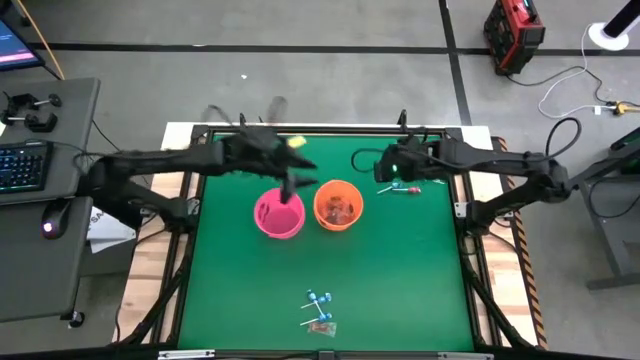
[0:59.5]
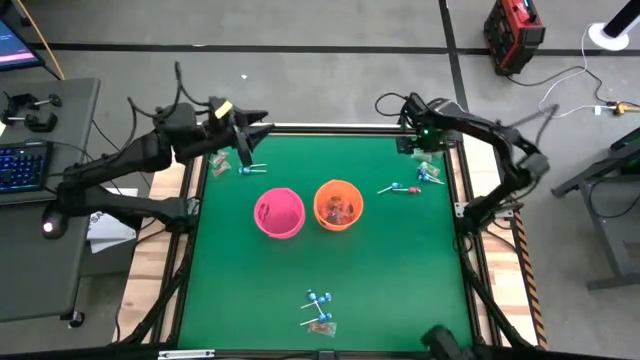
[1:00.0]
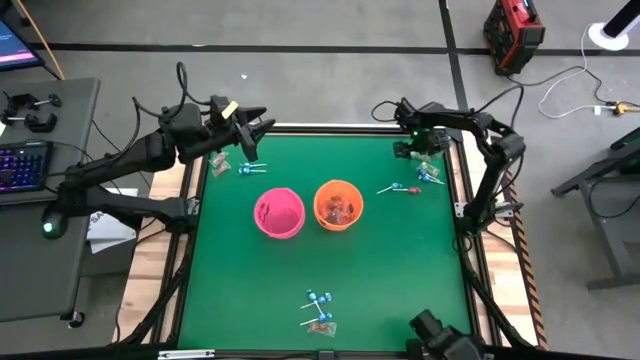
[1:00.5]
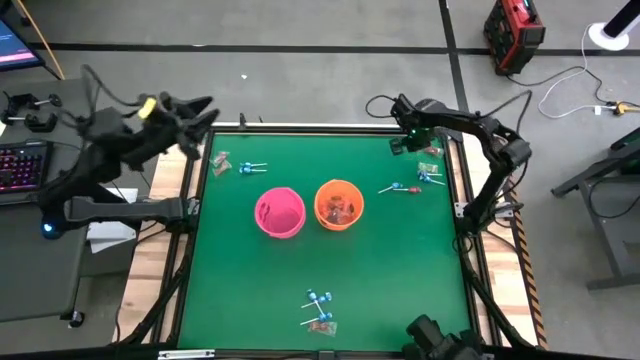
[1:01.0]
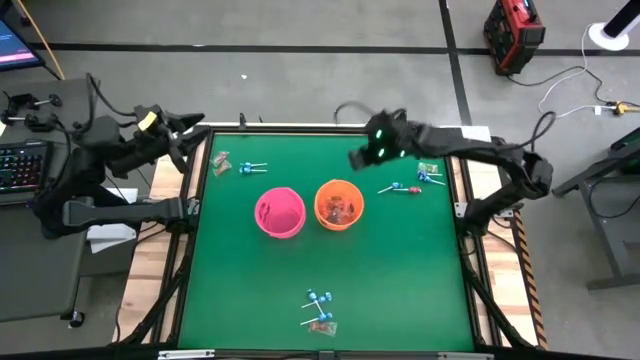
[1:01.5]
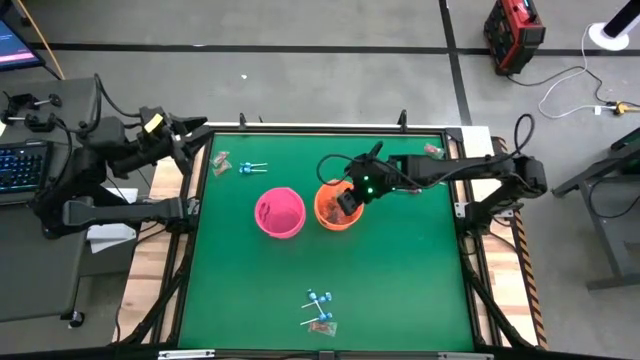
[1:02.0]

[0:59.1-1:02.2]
Task: Sort candy by brand, put in halloween buckets
Put the green gummy into the orange bucket

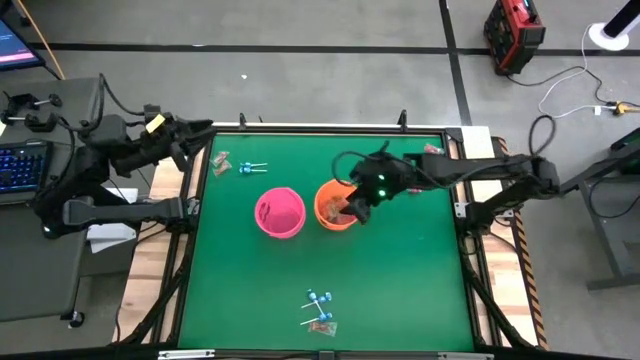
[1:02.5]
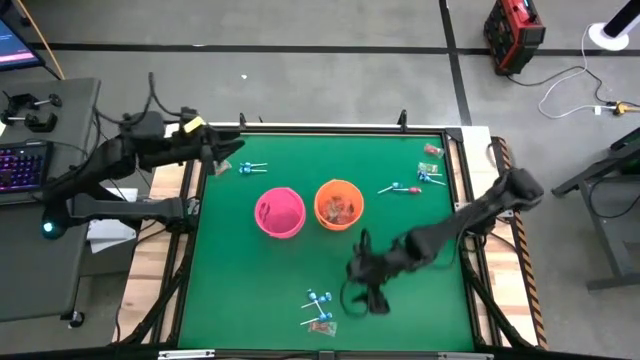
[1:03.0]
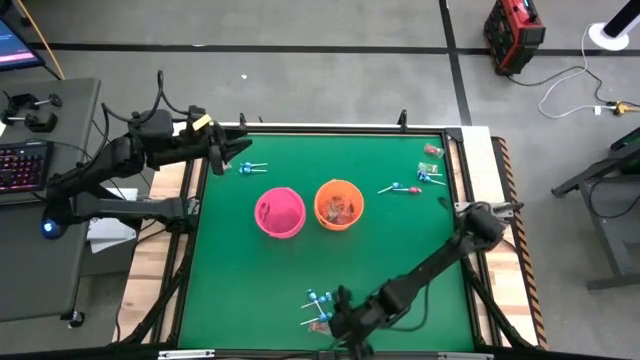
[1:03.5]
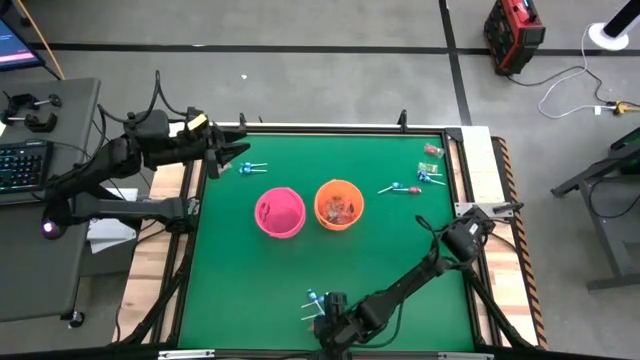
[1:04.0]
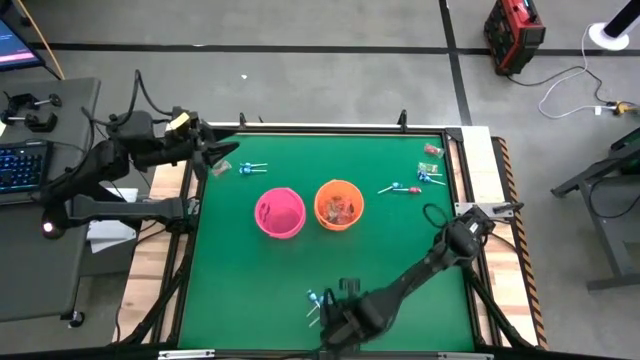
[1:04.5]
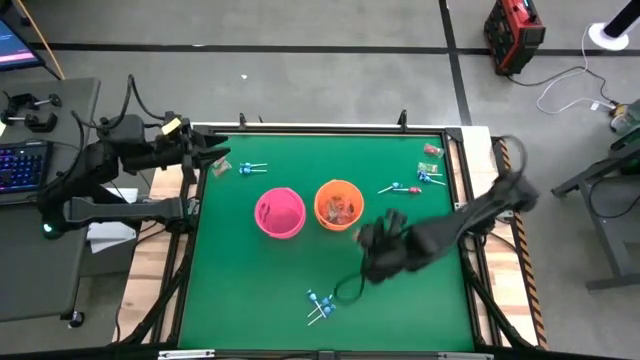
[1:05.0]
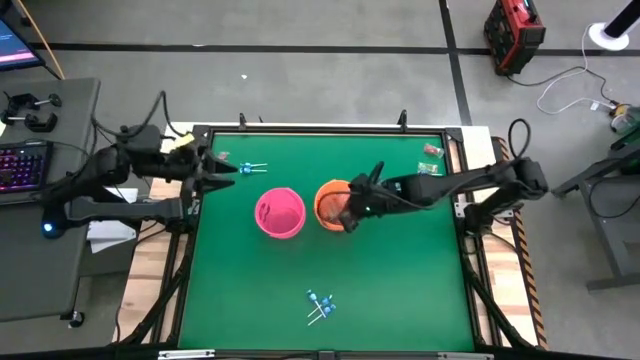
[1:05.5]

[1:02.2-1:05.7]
Put the orange gummy into the orange bucket

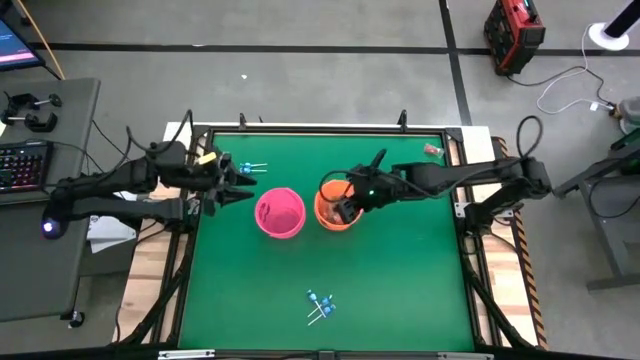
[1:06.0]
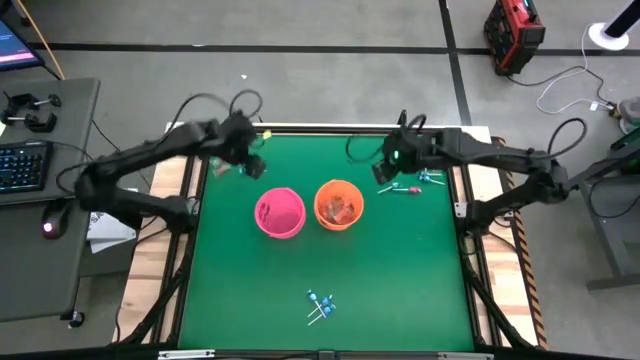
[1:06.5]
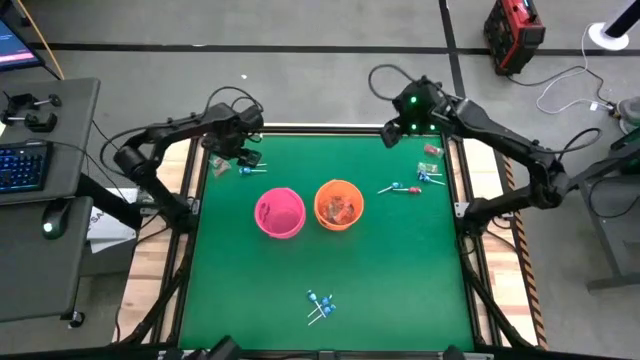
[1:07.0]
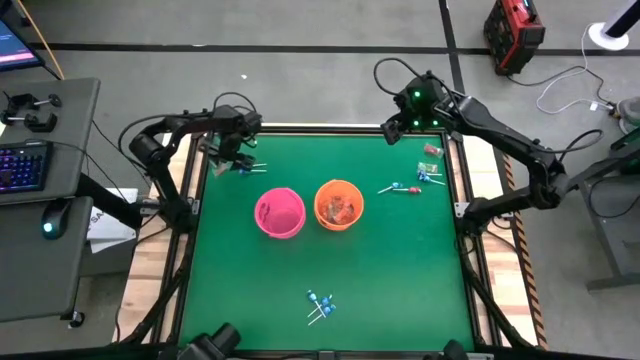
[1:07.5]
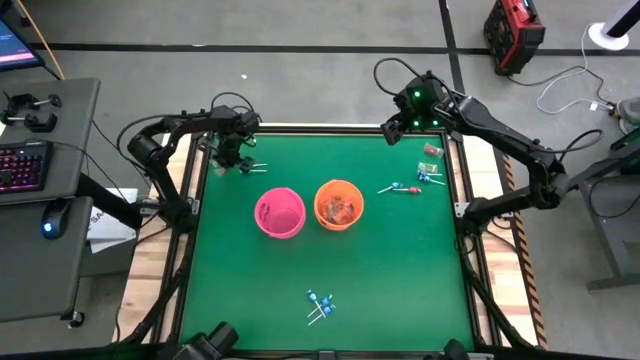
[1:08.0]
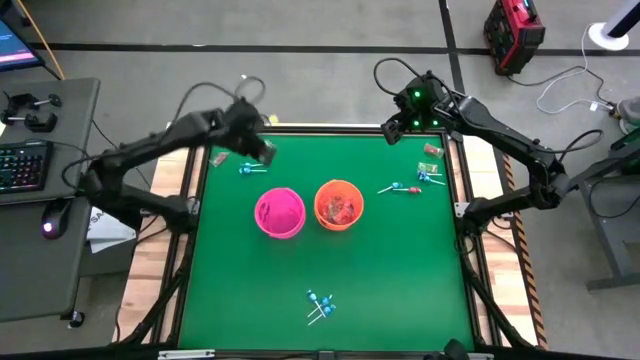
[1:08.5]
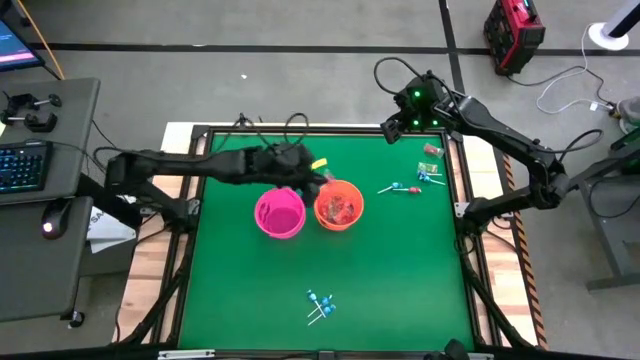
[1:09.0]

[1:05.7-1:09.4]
Put the orange gummy into the orange bucket

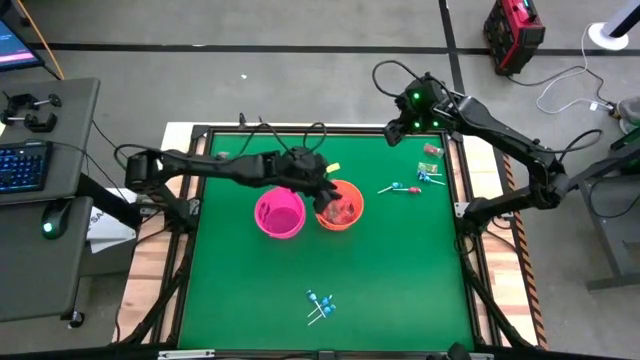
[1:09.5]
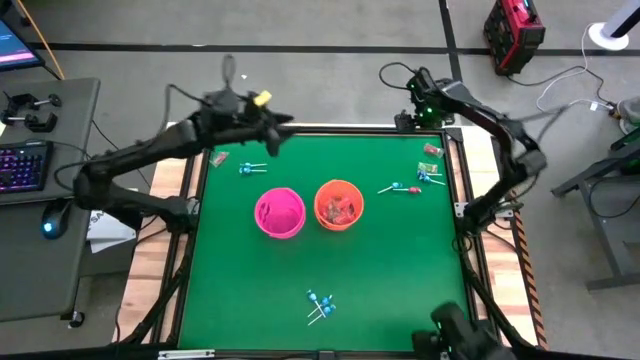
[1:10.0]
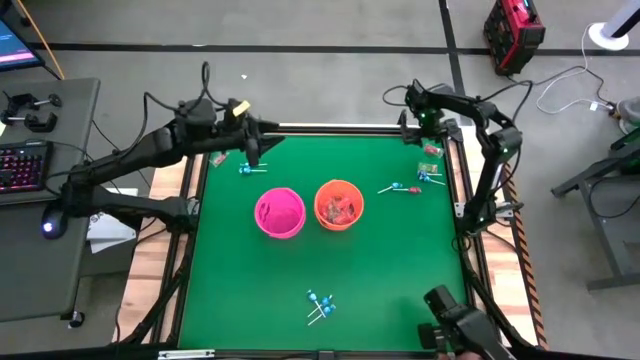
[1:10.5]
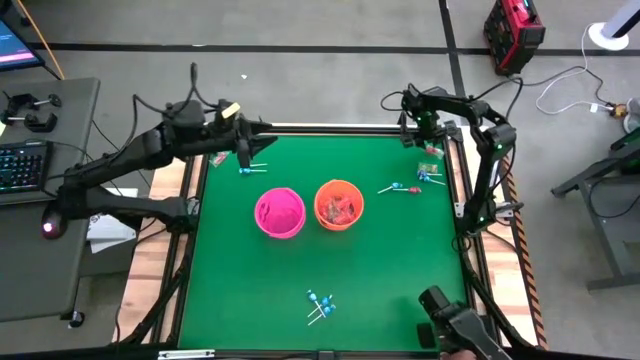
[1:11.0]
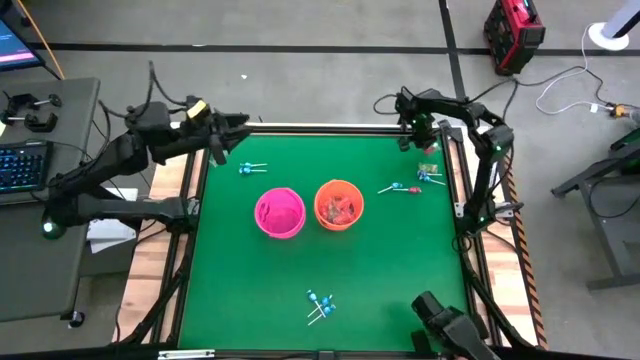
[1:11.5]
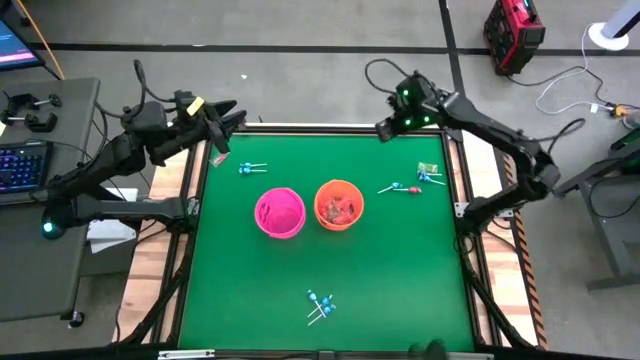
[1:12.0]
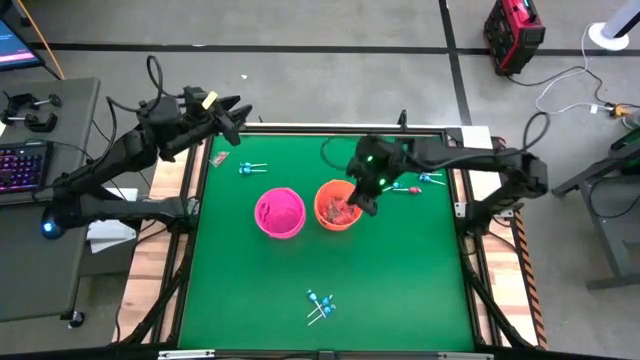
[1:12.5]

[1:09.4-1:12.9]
Put the orange gummy into the orange bucket

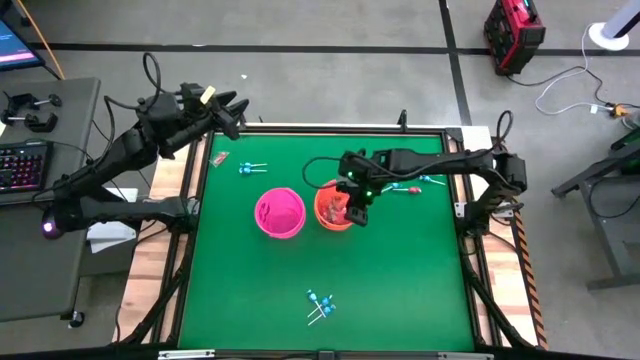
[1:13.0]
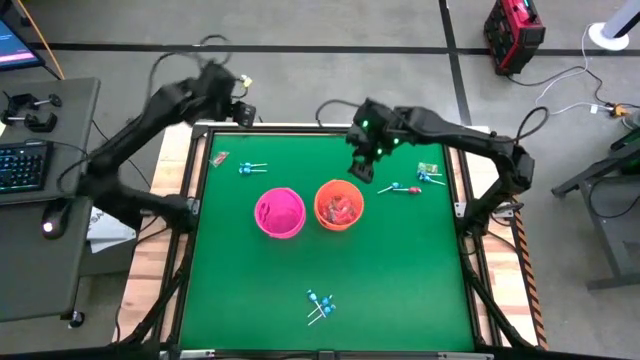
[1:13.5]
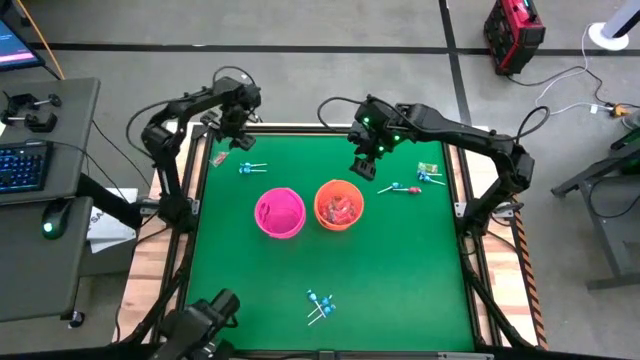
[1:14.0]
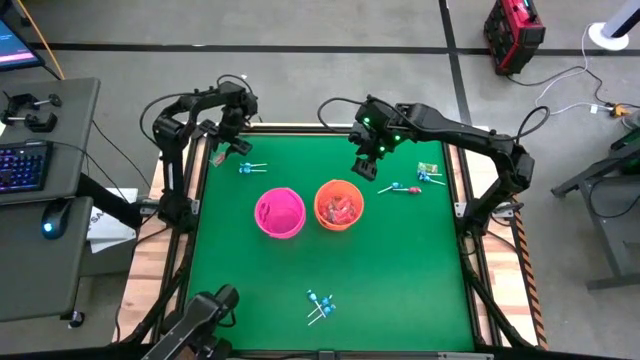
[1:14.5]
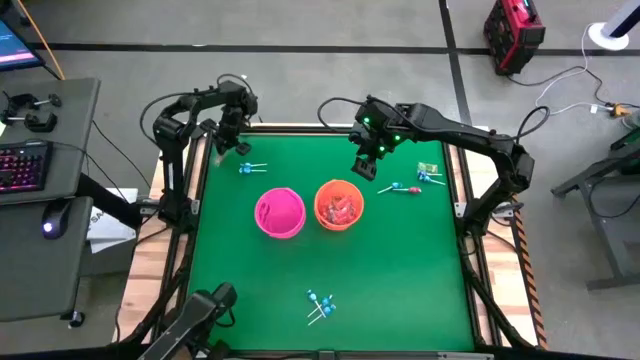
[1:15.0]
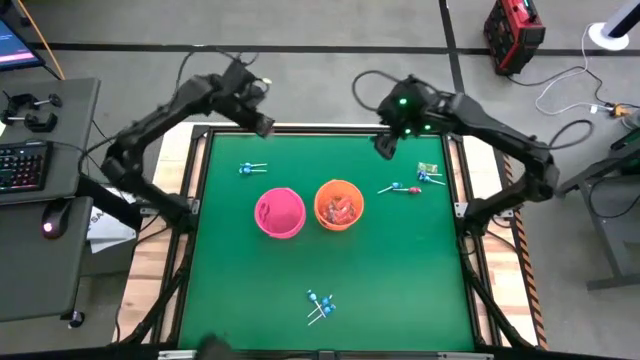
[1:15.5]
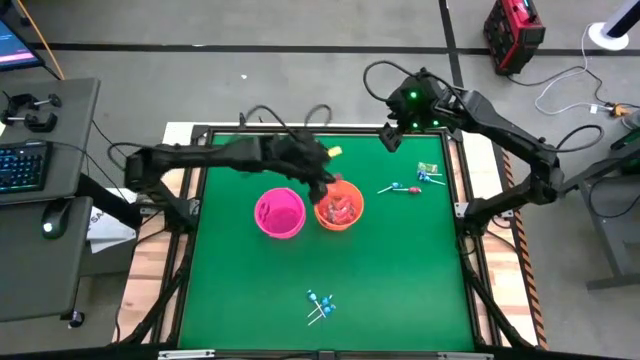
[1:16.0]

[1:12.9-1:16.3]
Put the orange gummy into the orange bucket

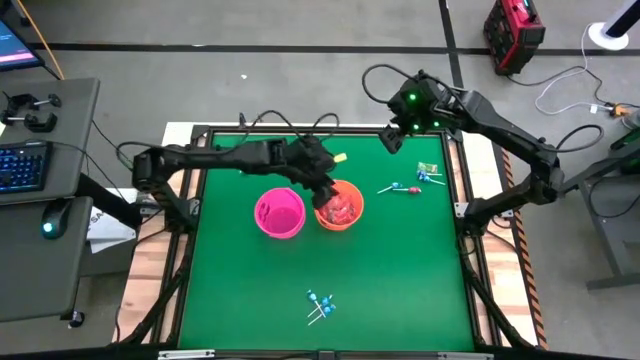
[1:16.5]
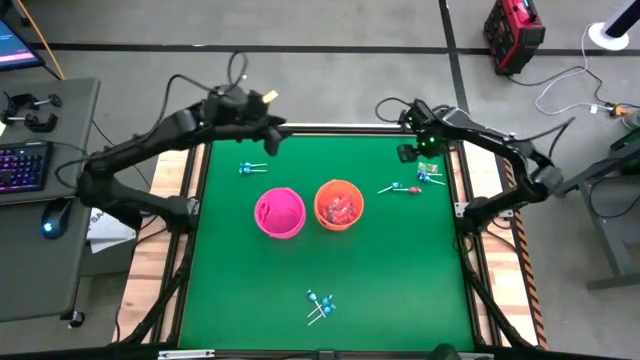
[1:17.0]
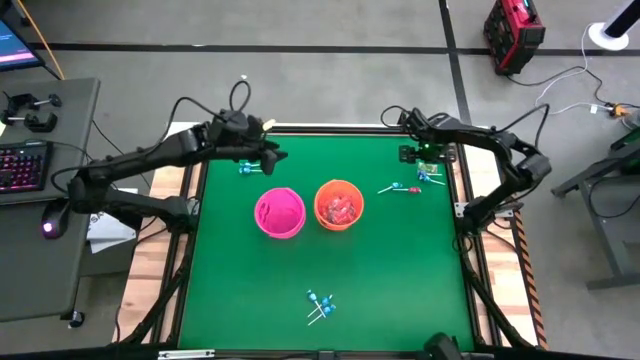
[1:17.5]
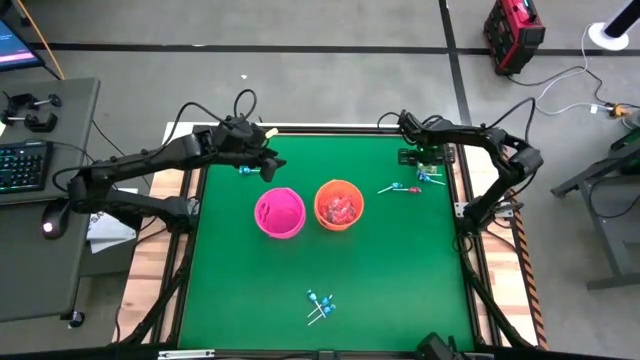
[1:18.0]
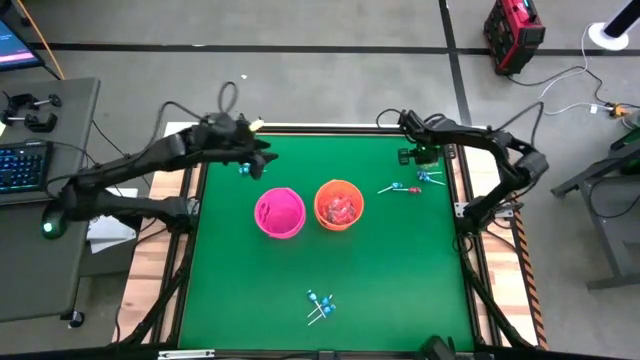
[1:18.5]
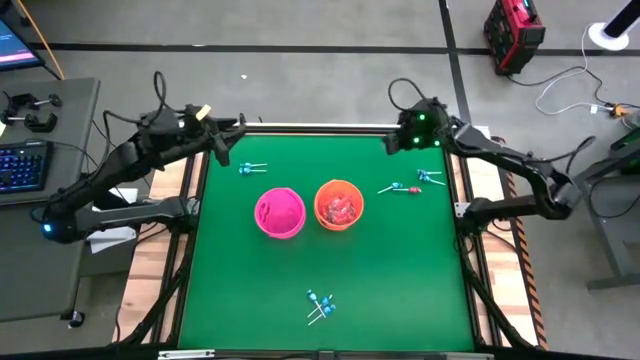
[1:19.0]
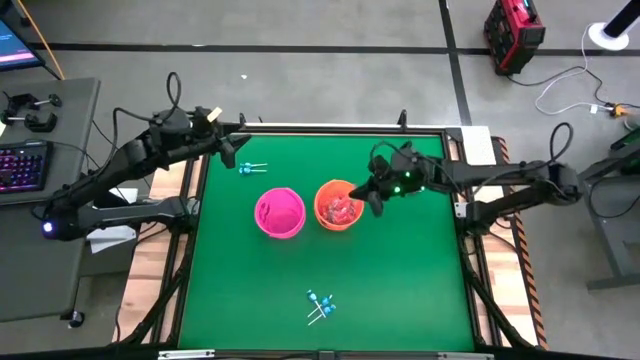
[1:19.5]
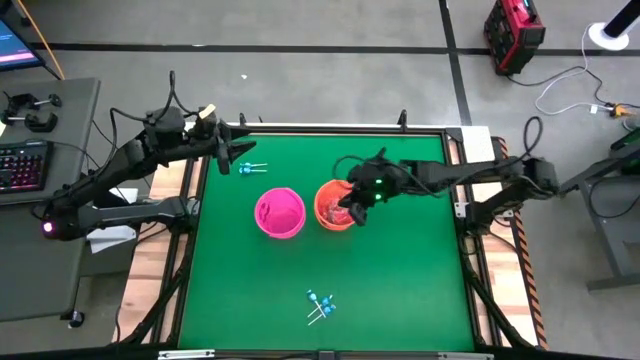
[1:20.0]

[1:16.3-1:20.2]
Put the green gummy into the orange bucket
